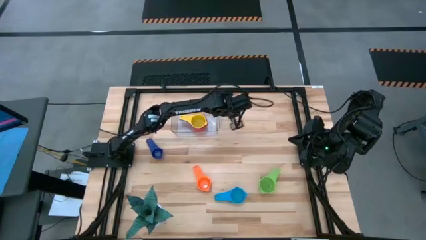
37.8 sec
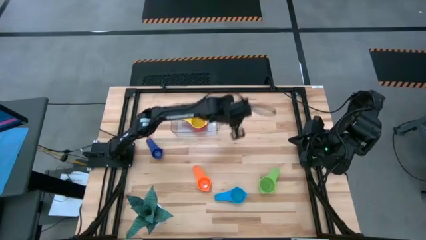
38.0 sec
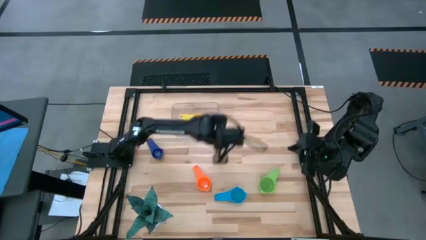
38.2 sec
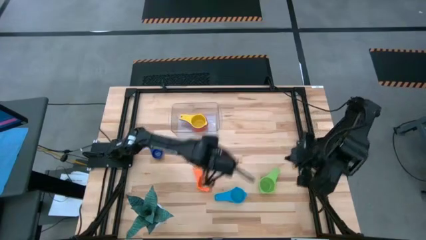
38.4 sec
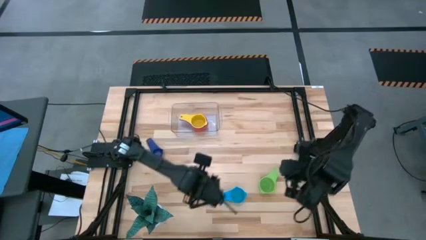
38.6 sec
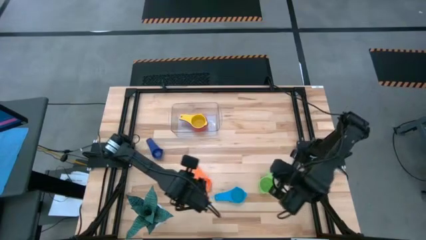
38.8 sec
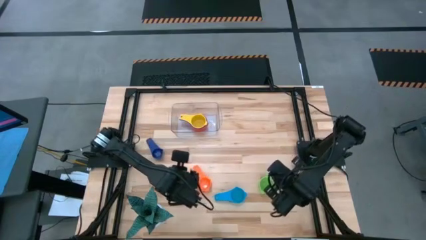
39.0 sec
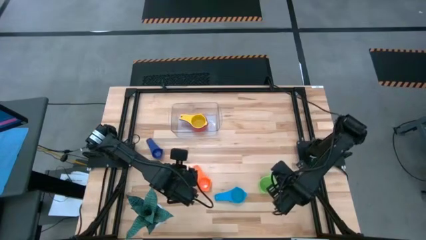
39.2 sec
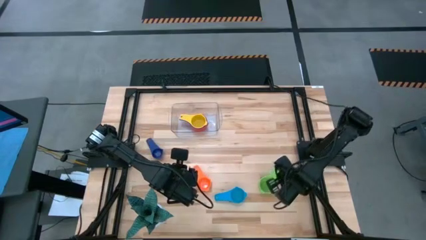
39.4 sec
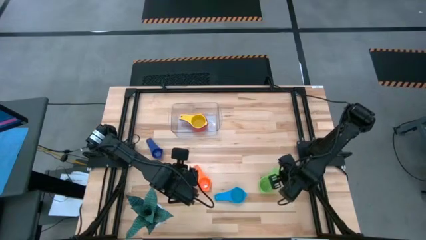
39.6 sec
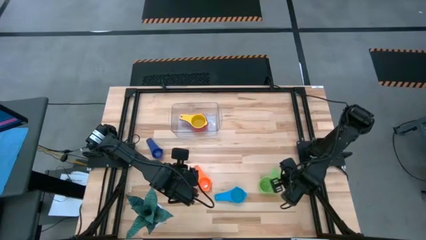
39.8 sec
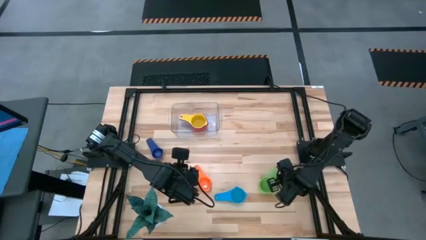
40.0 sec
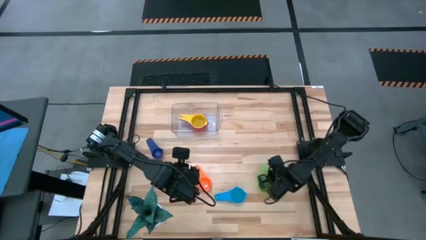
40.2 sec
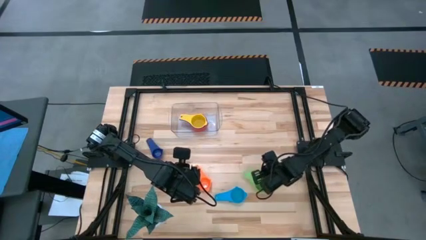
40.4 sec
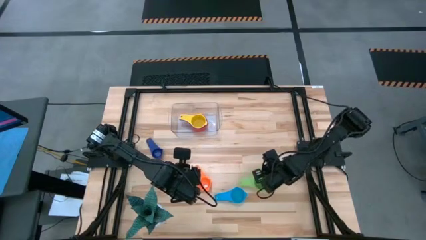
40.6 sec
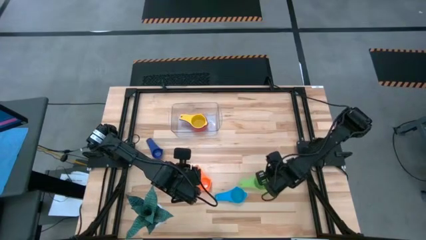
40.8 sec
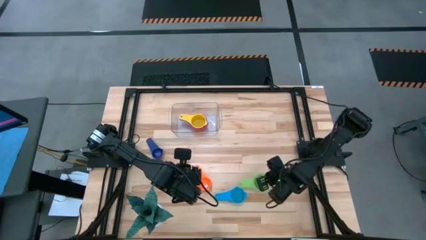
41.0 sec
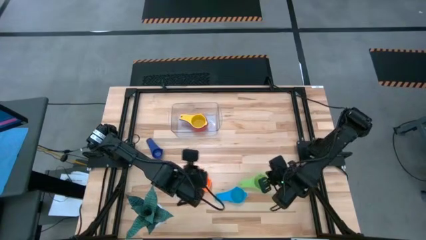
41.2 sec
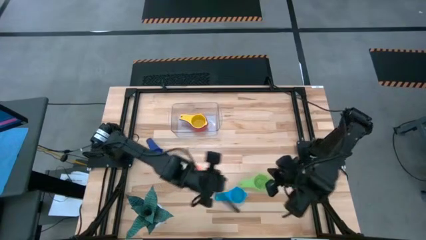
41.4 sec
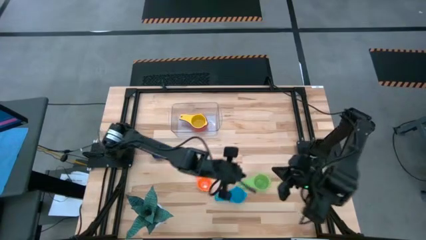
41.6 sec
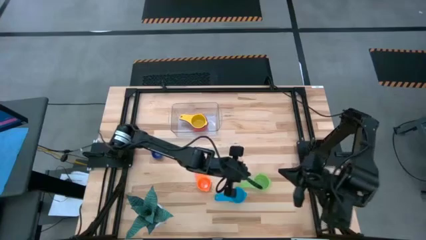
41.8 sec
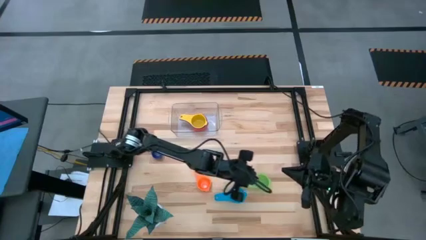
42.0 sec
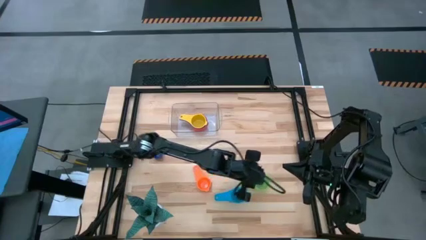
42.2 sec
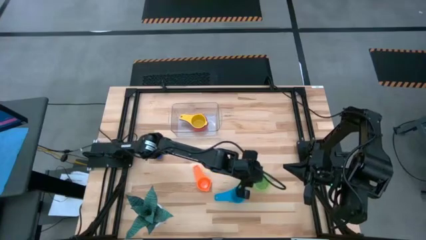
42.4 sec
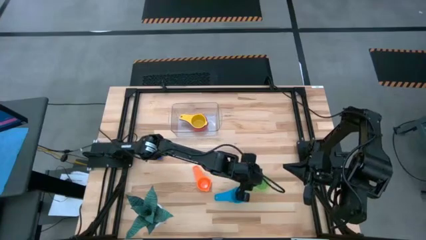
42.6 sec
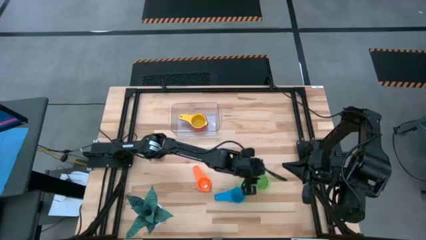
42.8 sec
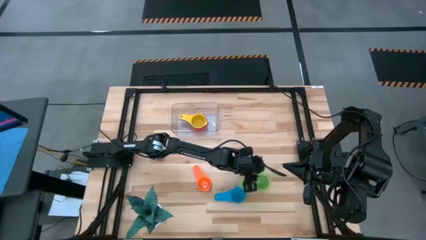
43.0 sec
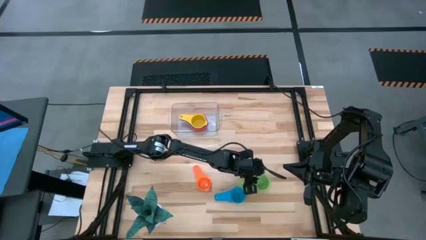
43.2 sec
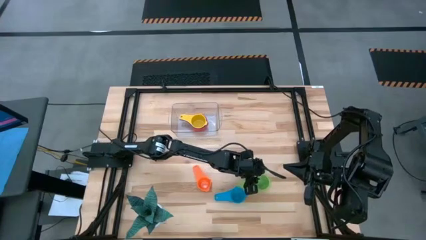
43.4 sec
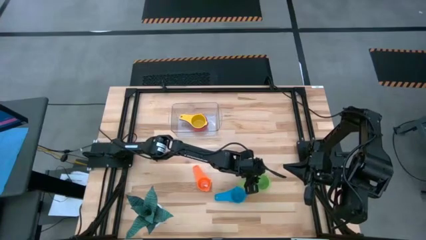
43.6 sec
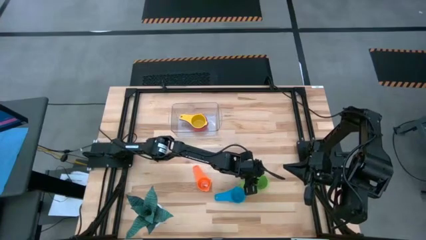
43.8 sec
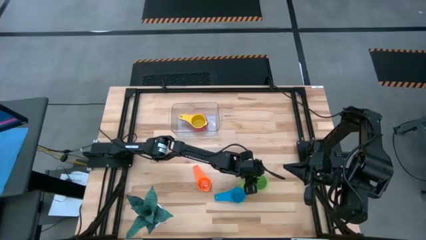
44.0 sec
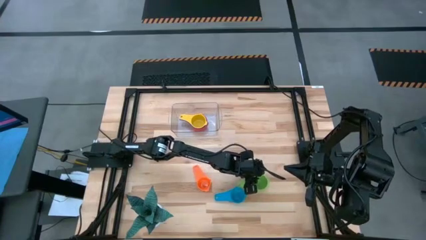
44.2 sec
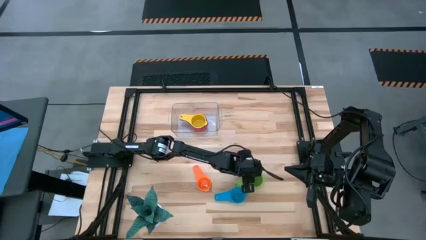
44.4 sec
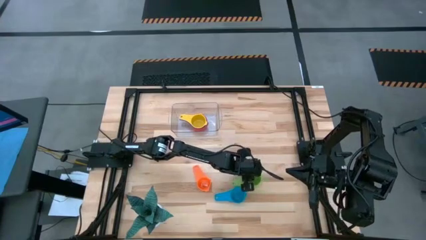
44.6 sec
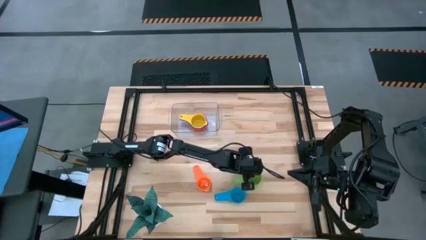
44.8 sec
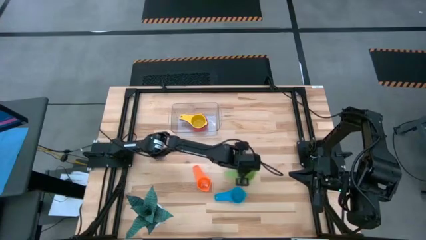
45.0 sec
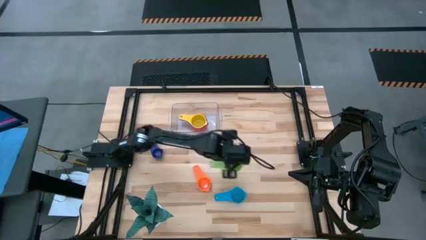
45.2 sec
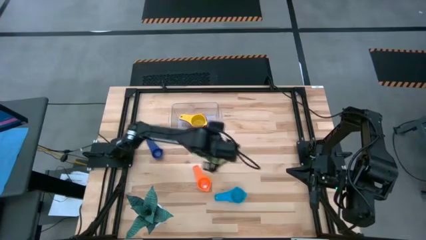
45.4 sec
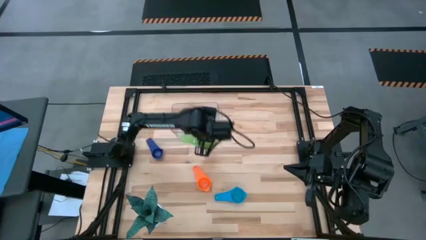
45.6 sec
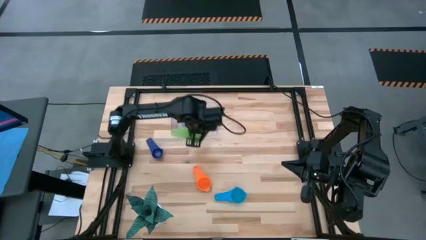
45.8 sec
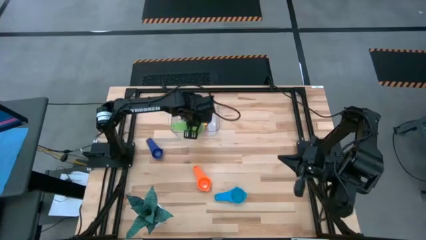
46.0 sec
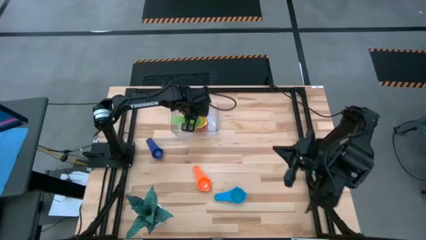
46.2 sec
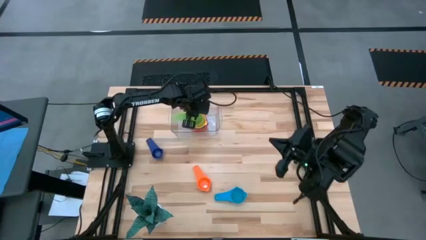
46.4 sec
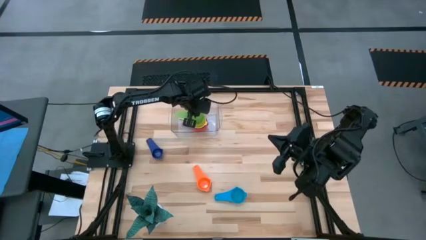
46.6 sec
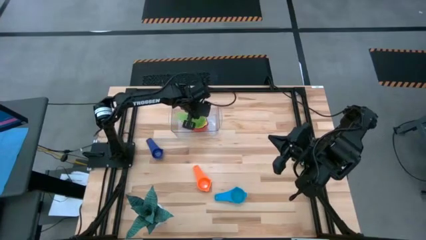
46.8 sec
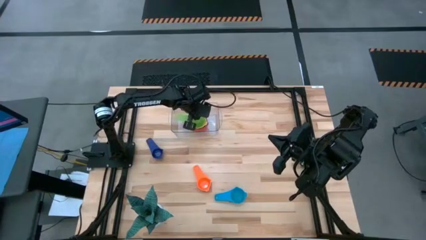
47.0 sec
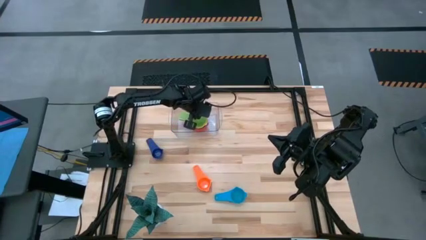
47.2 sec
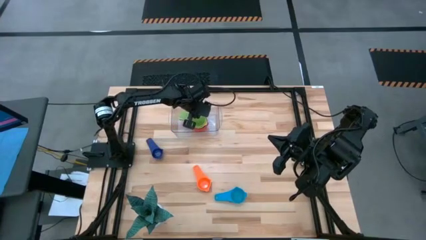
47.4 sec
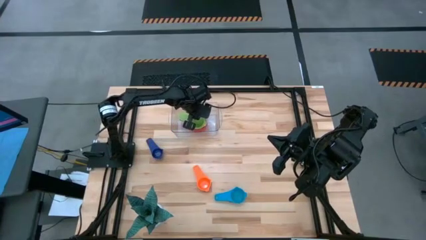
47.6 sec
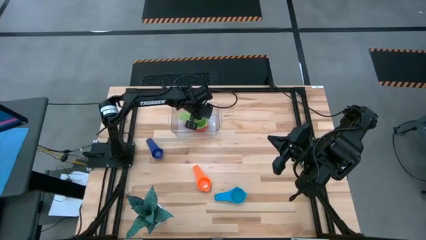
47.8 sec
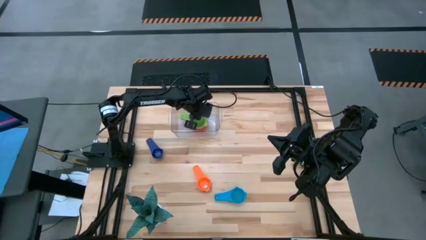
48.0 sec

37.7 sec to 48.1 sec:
Task: Nest measuring cups in basket
Stack the green measuring cup on top of the yellow measuring cup into the transparent bin

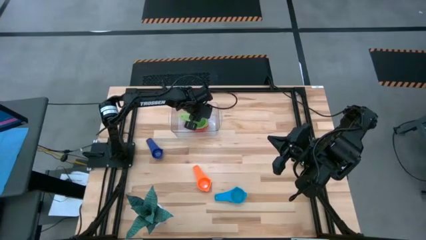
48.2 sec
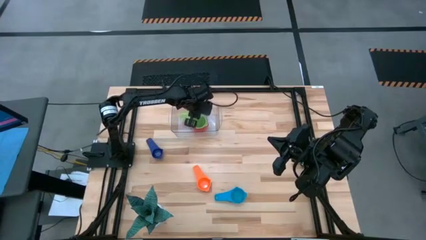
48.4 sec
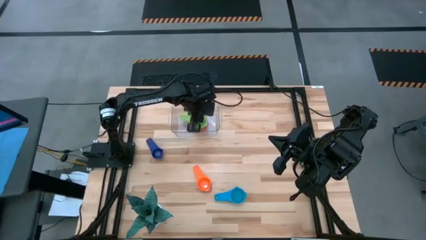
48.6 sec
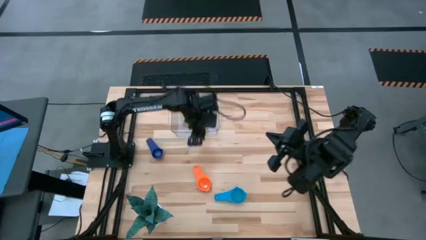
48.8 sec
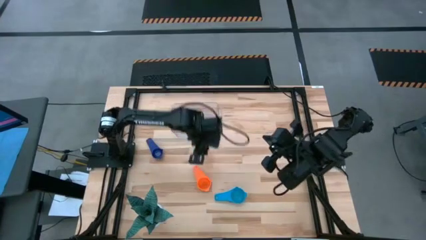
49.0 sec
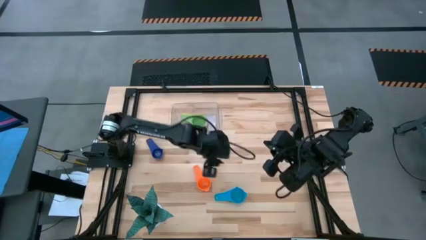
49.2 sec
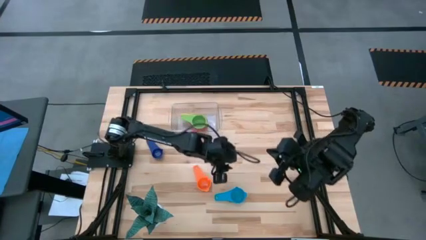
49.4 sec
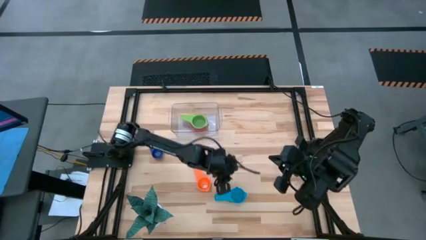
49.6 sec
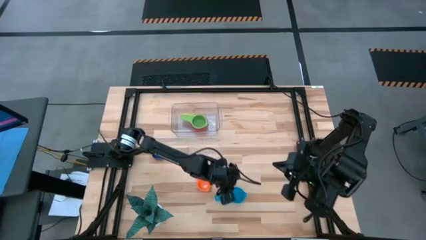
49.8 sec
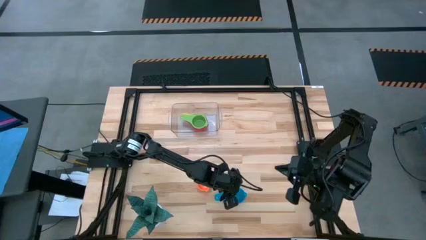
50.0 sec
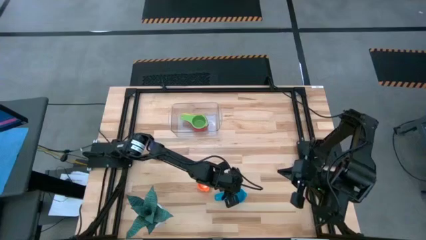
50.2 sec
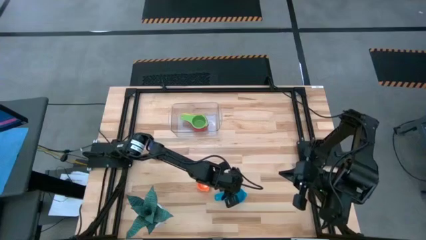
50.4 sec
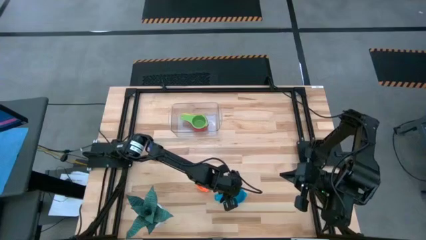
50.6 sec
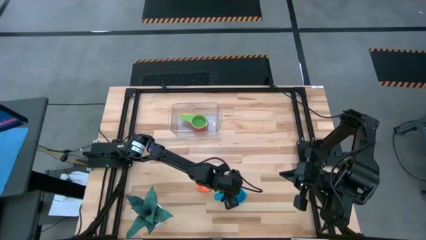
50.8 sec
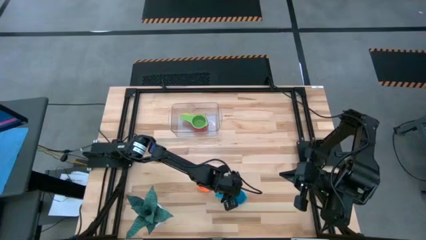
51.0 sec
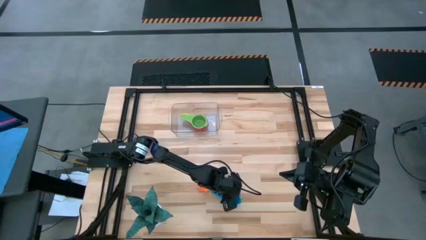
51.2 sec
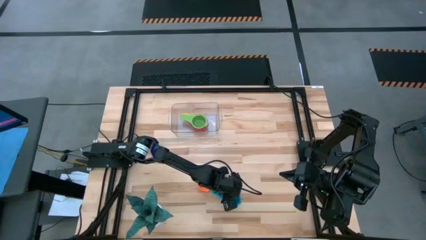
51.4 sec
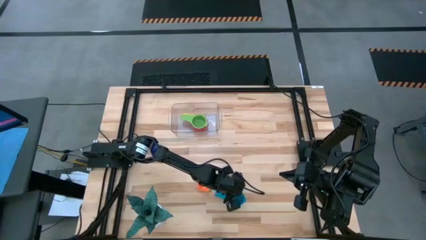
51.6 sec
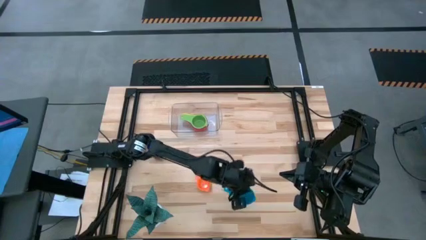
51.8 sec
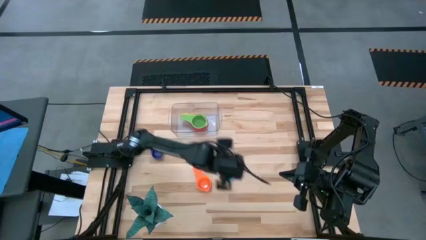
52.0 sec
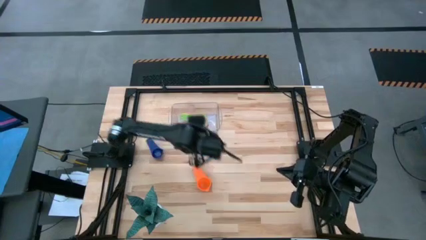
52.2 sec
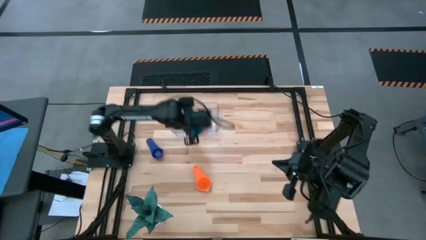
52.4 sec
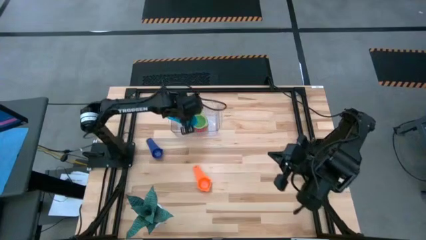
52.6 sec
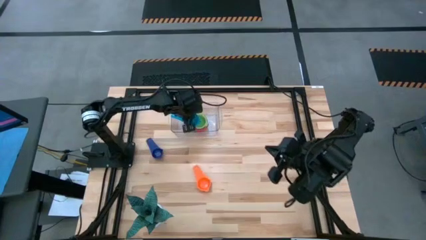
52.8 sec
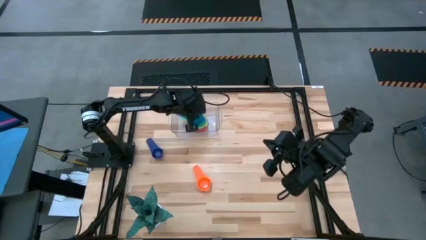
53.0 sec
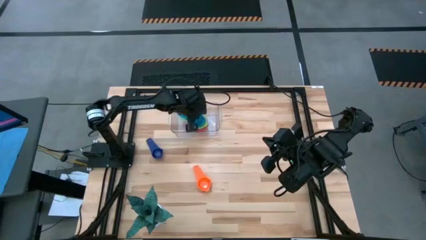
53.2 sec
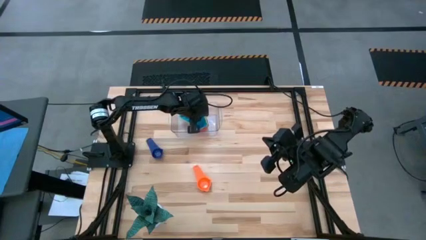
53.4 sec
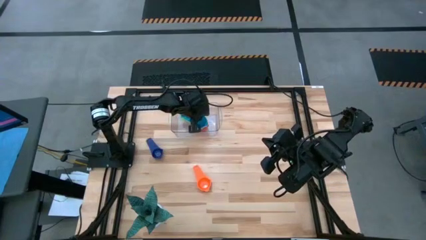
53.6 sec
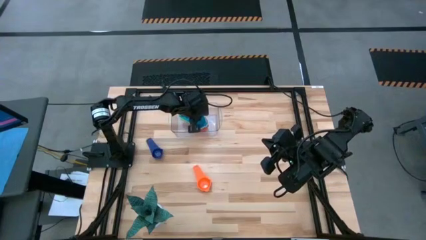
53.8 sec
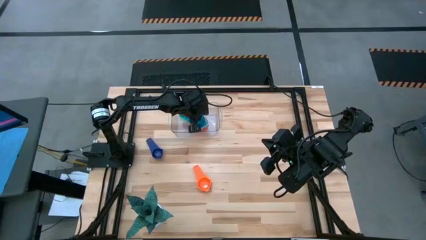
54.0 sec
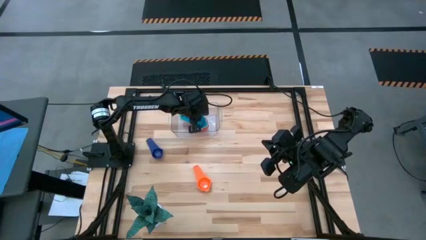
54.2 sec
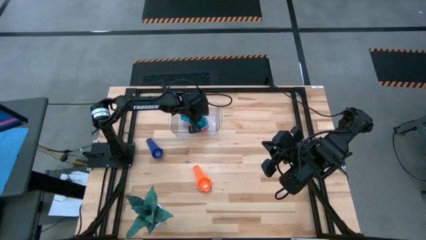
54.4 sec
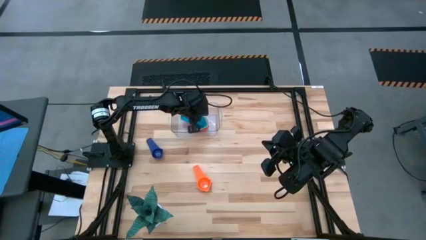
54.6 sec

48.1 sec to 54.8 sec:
Stack the light blue measuring cup on top of the green measuring cup into the transparent bin
